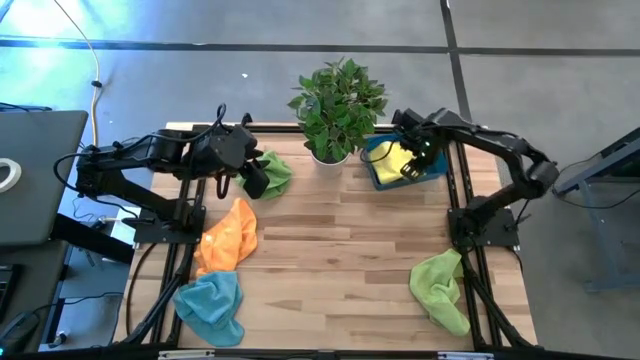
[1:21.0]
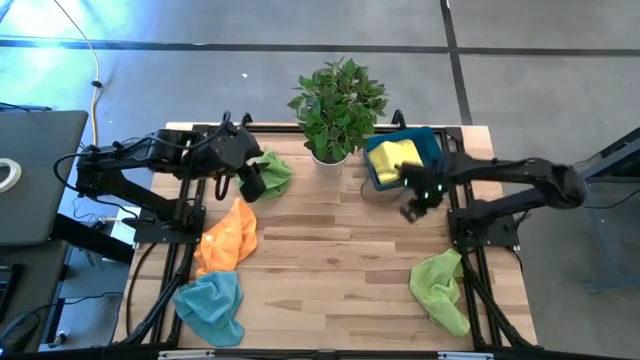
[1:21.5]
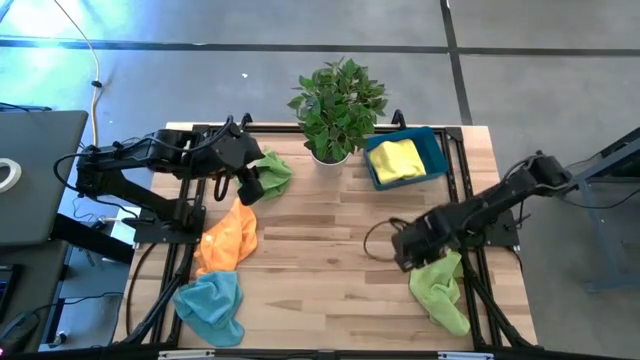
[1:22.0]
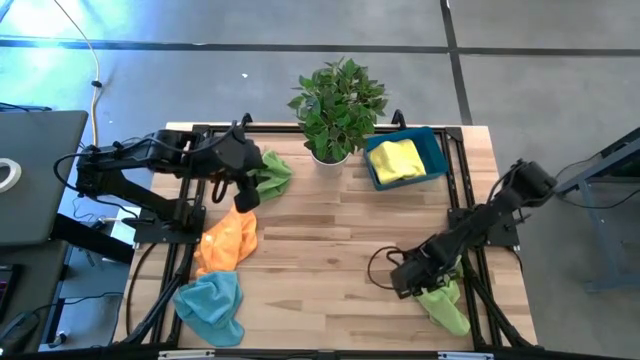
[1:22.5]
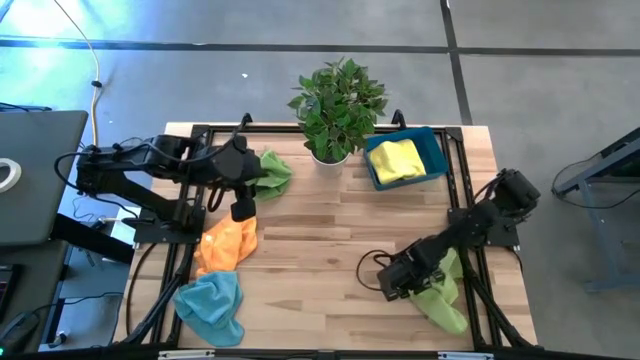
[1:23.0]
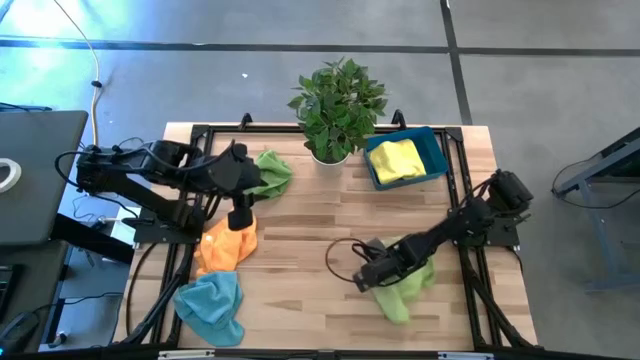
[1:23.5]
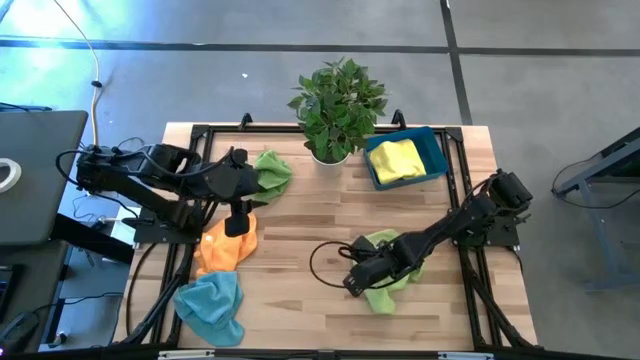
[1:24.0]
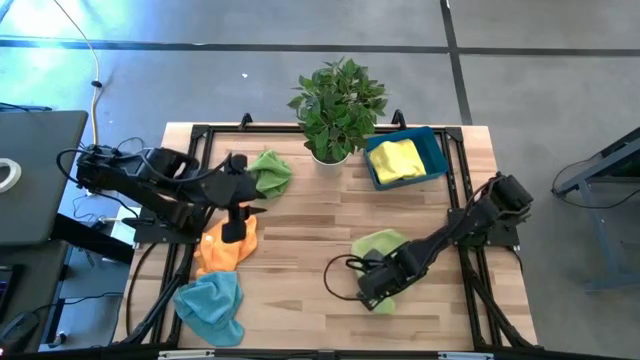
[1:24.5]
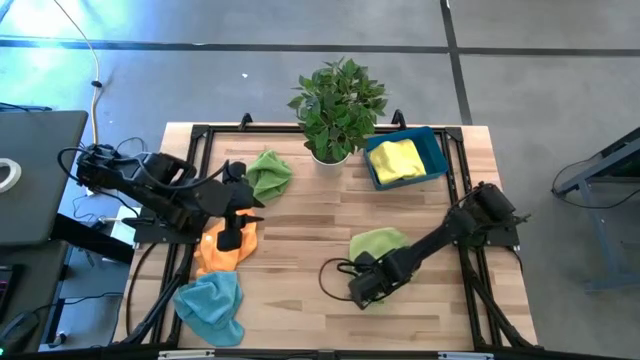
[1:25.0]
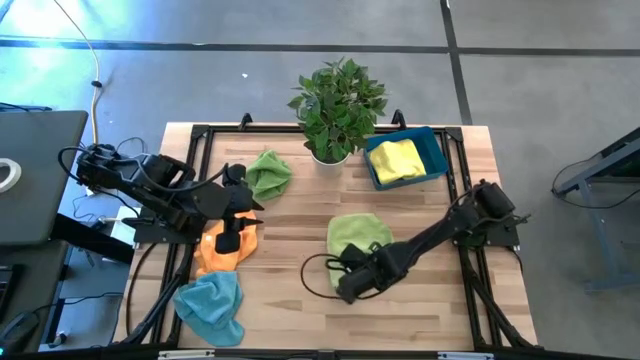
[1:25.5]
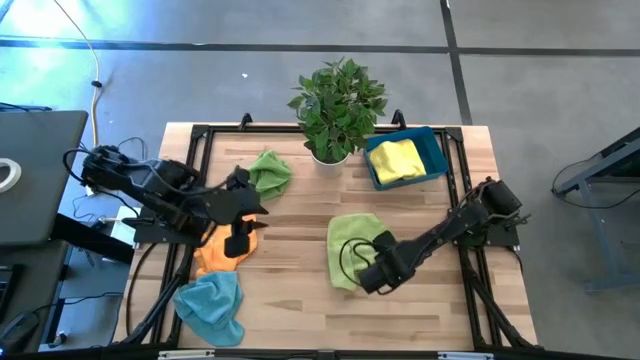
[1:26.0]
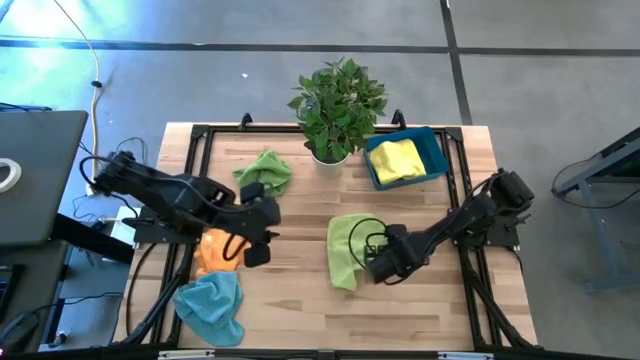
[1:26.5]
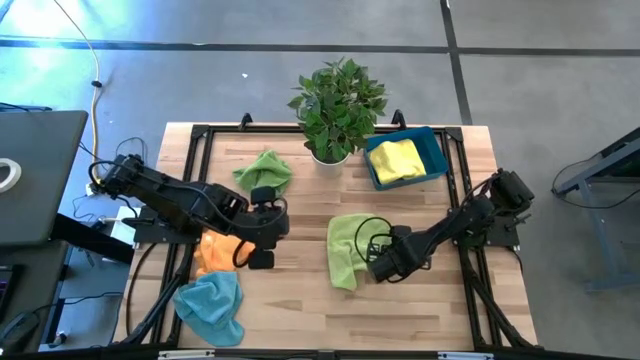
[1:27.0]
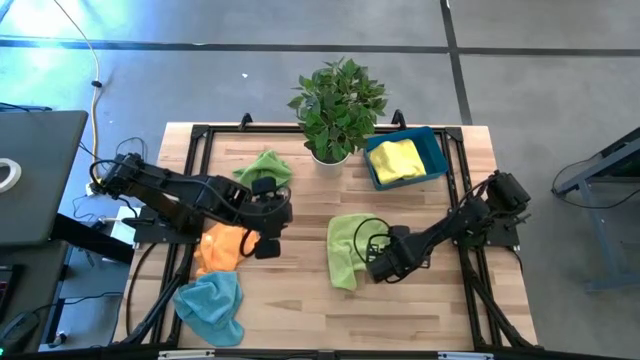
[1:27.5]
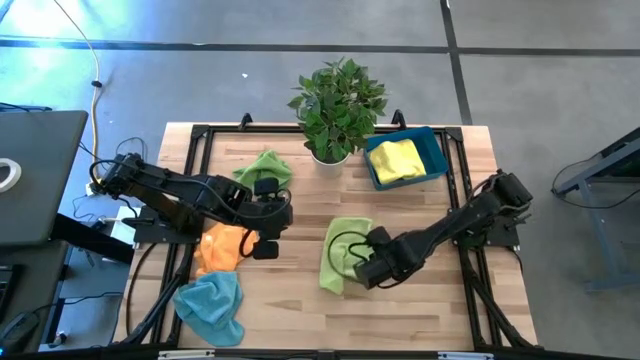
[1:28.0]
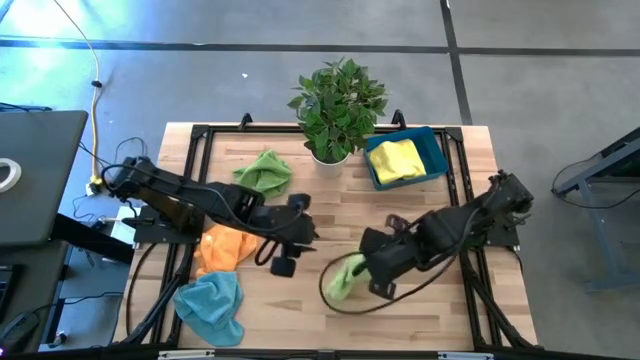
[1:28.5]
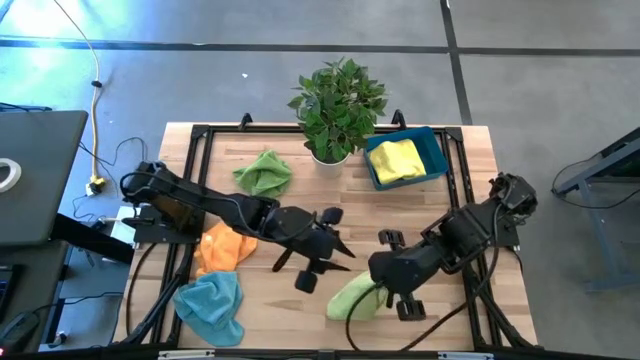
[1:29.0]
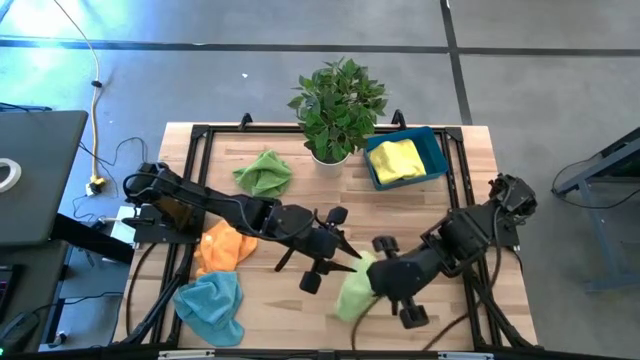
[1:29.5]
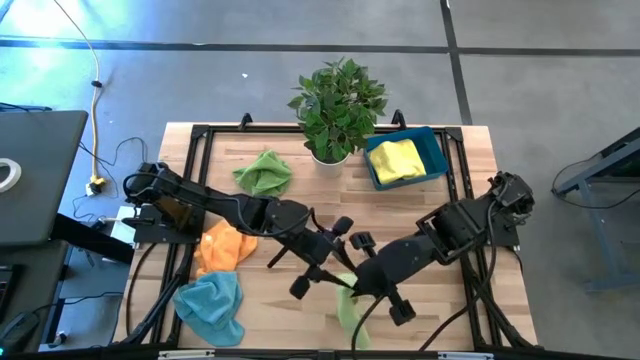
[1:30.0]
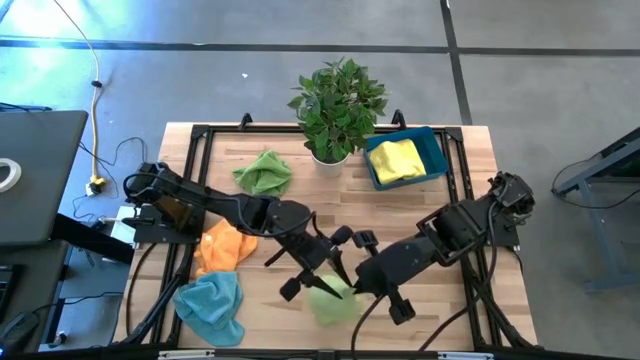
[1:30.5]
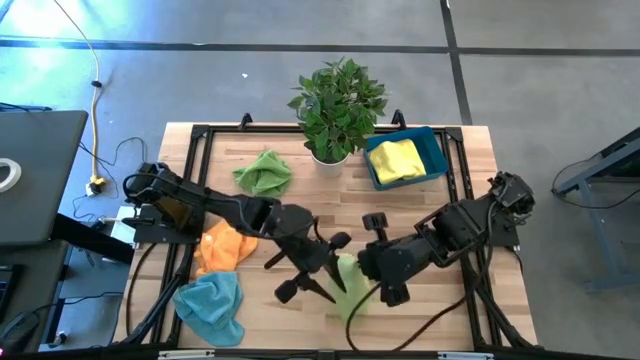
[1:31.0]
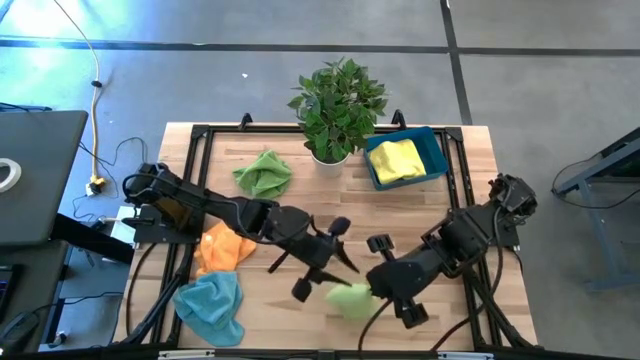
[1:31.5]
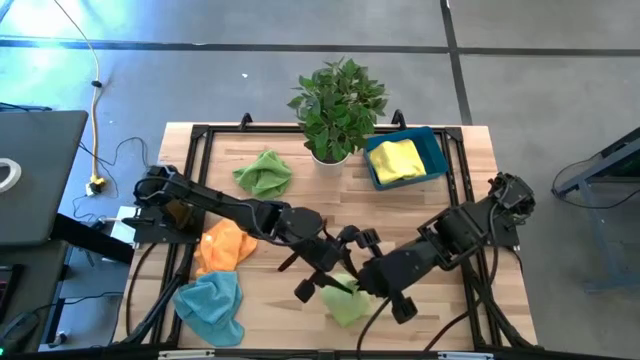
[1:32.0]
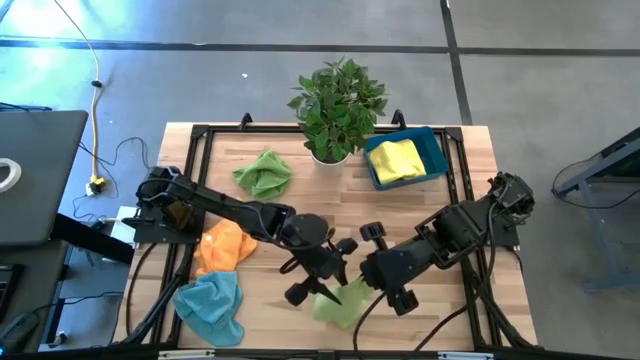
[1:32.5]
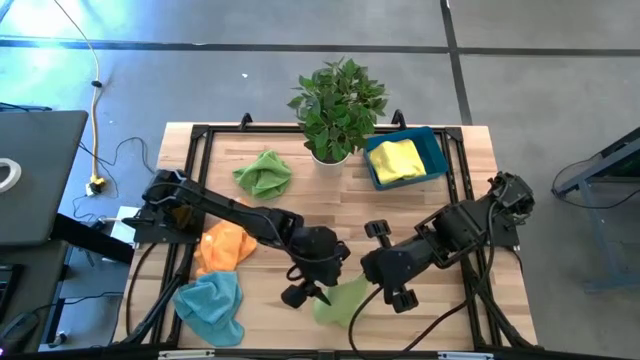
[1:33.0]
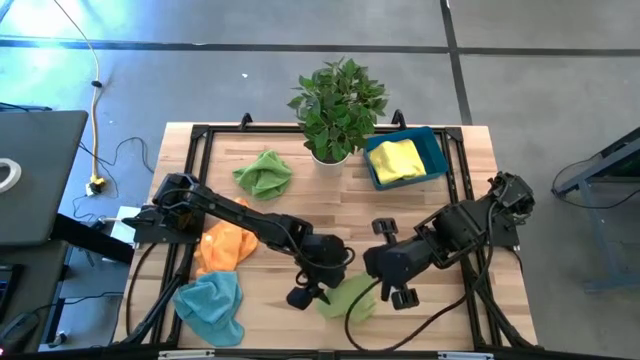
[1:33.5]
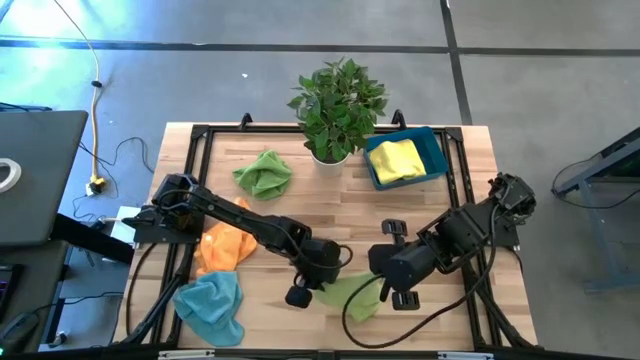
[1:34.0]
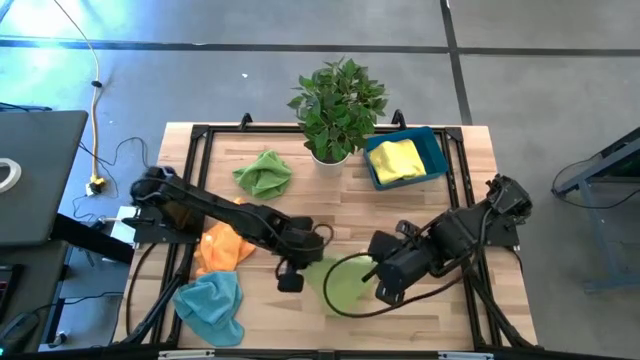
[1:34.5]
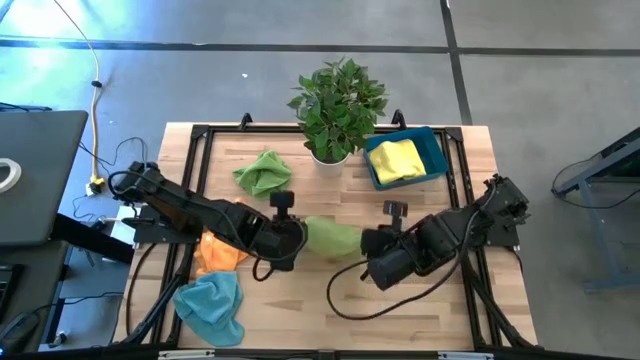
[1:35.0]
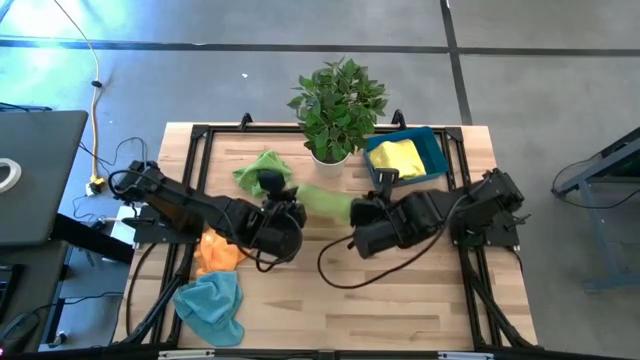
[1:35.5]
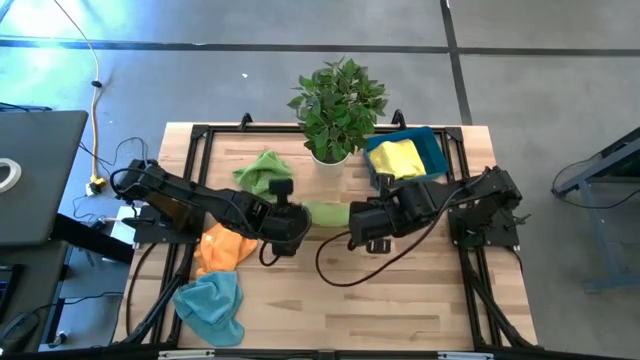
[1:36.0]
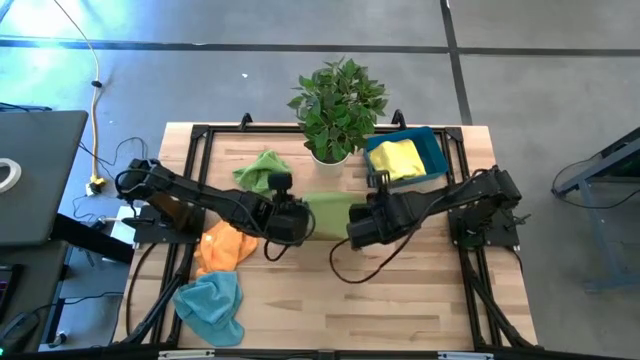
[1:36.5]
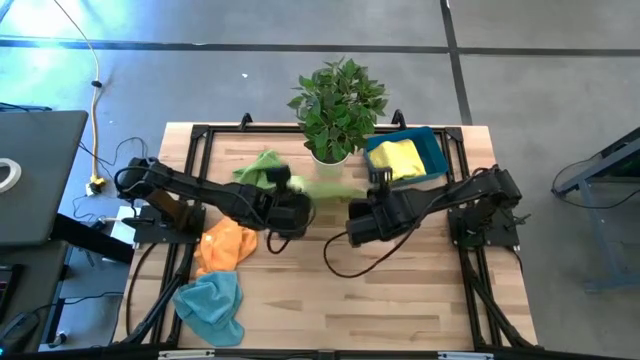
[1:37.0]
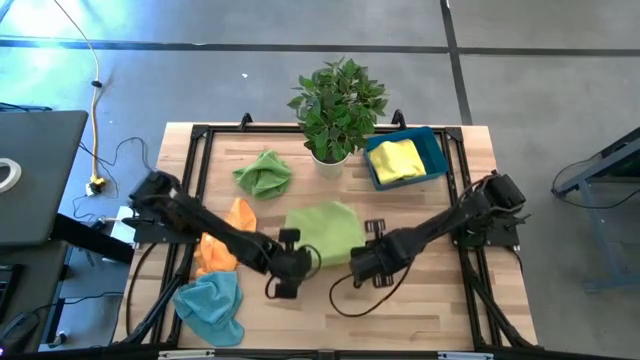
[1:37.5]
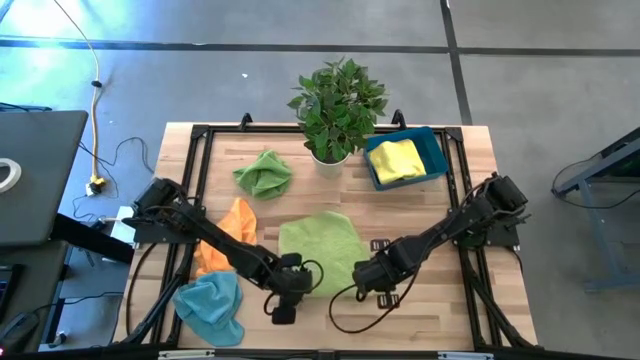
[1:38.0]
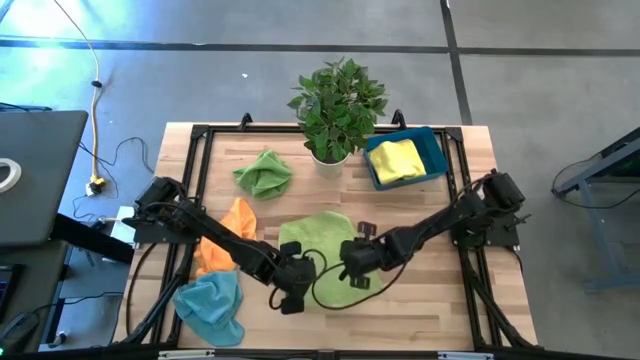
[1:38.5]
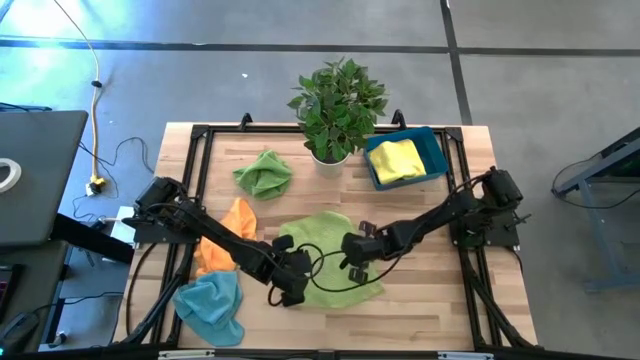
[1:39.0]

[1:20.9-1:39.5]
Task: Sort microfiber towel by color & place in baskets
Fold the light green towel

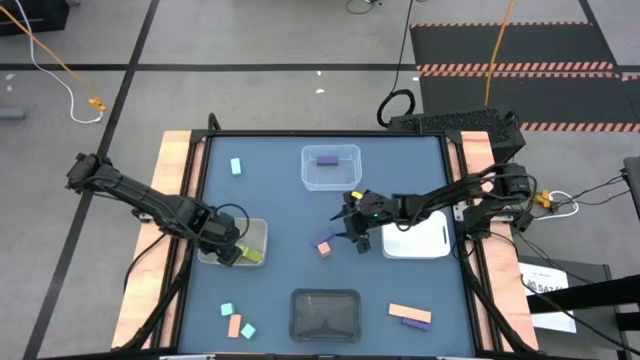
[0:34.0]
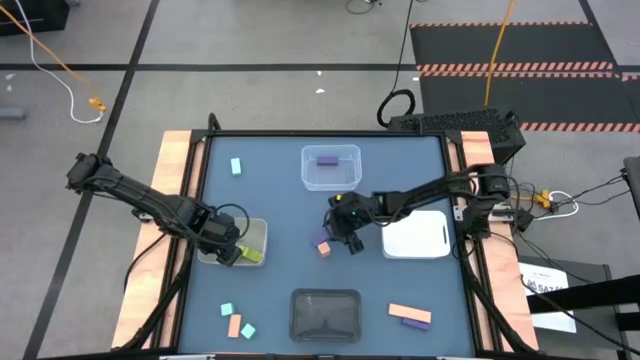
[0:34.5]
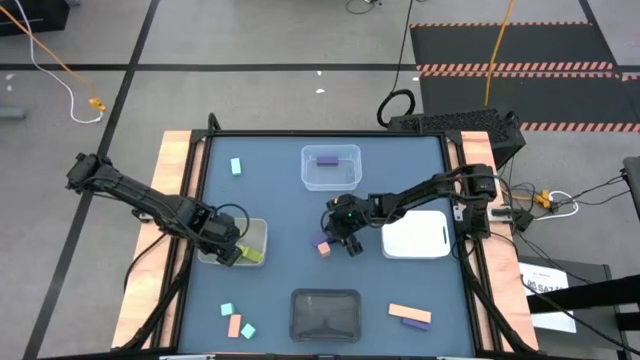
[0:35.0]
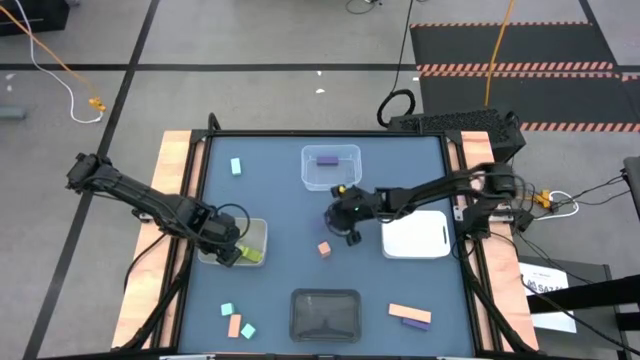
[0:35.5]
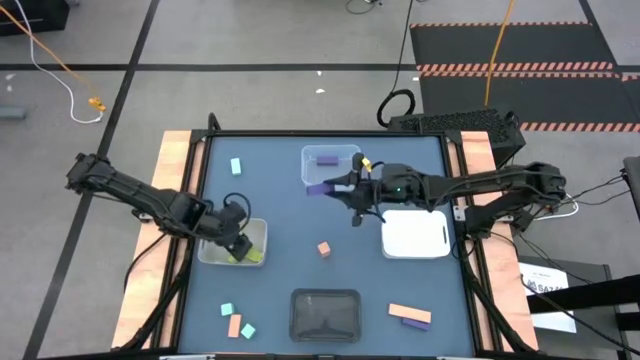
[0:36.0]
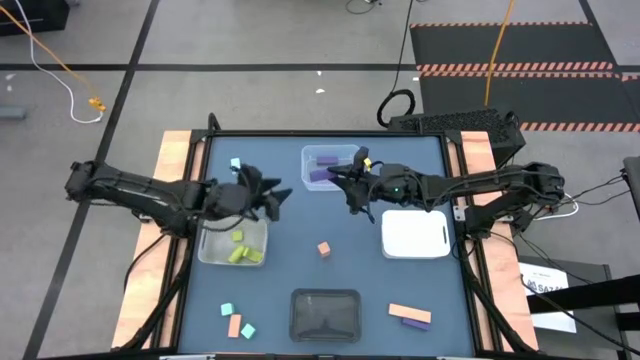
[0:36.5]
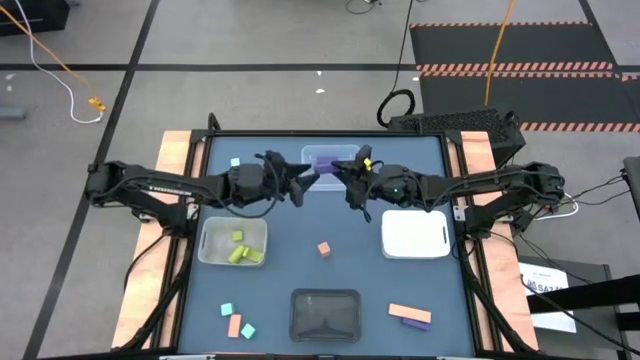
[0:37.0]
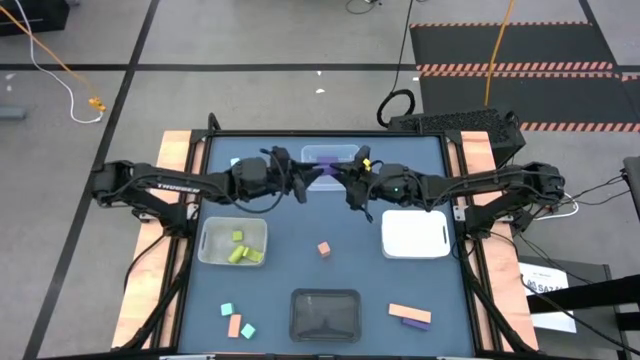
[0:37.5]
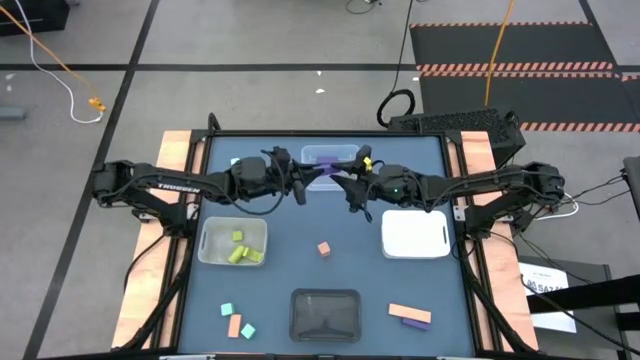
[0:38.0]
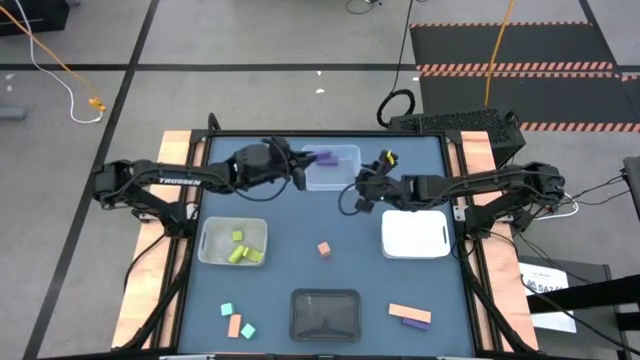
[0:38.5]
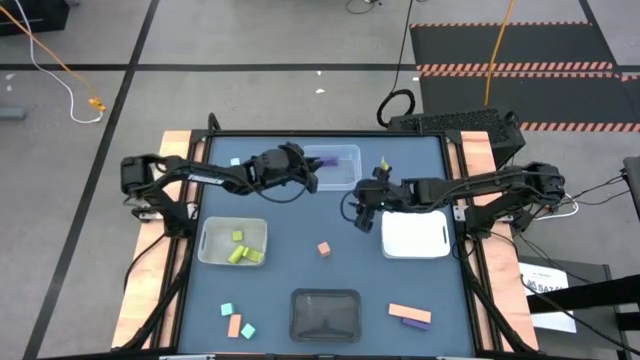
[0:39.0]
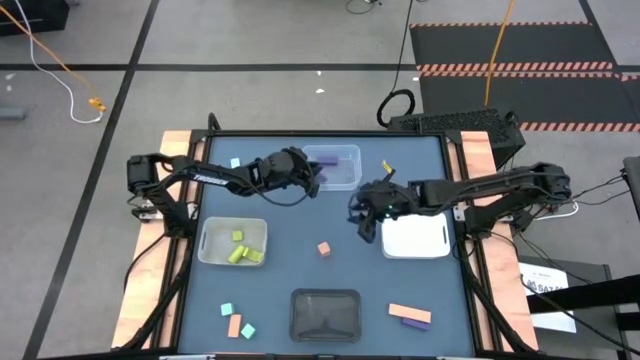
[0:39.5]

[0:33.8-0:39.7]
Task: Sort & place blocks by color
Put the top purple block into the transparent bin
